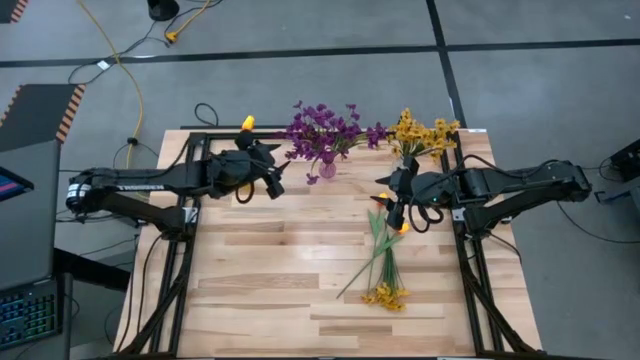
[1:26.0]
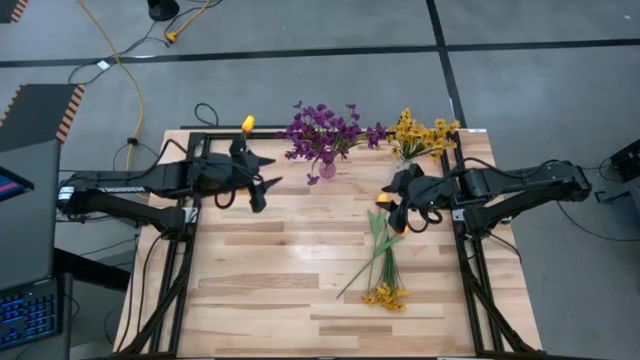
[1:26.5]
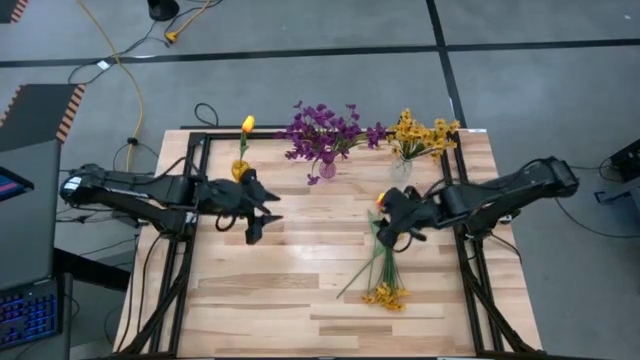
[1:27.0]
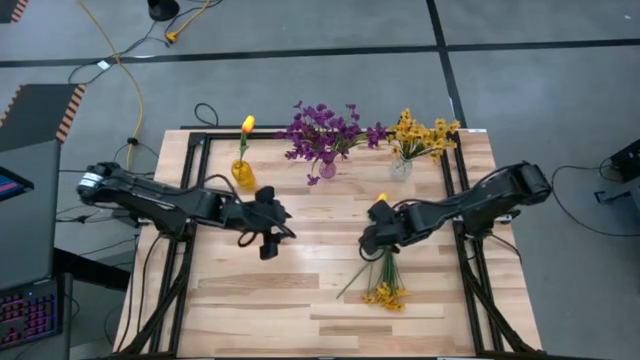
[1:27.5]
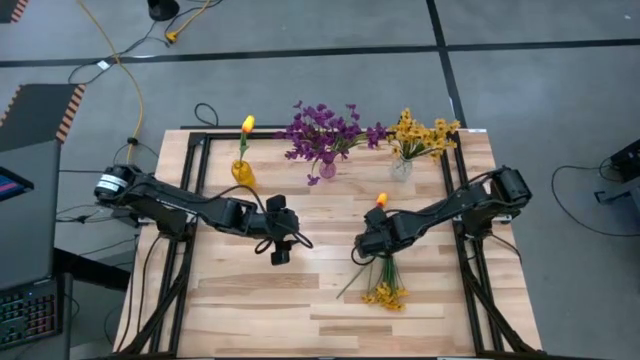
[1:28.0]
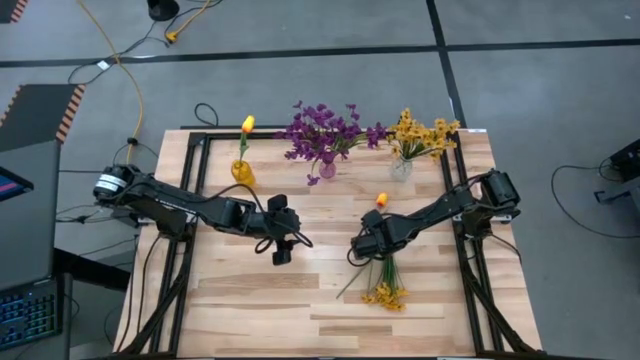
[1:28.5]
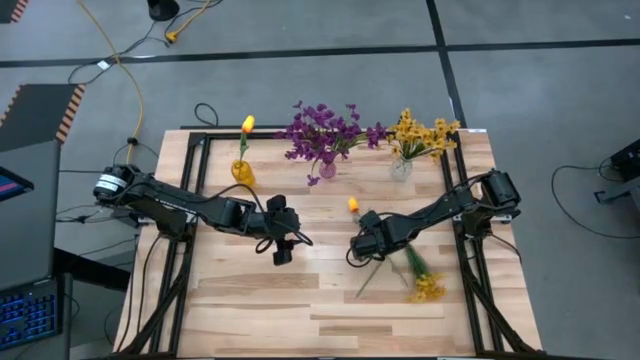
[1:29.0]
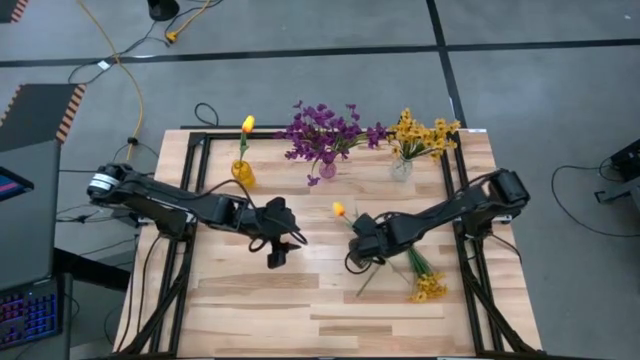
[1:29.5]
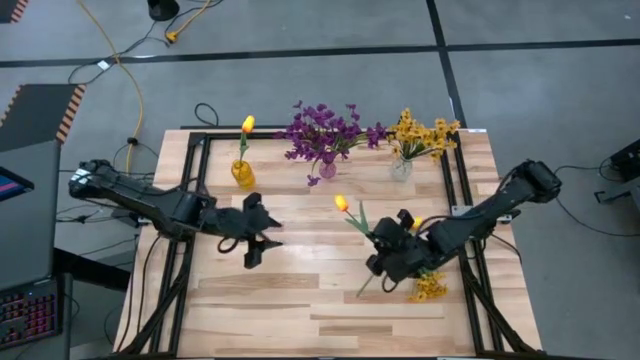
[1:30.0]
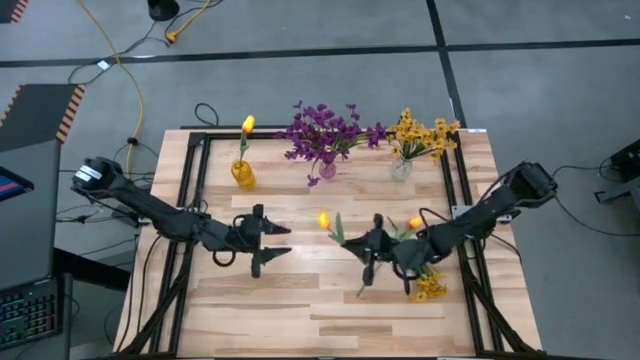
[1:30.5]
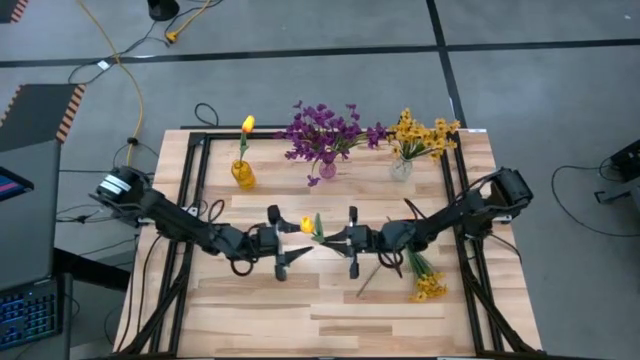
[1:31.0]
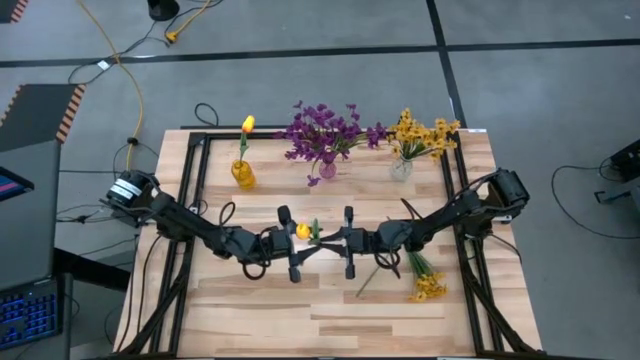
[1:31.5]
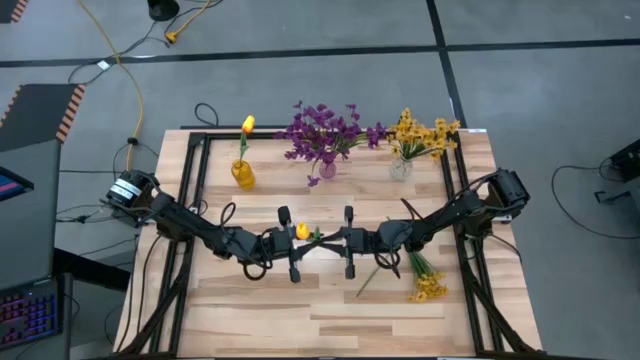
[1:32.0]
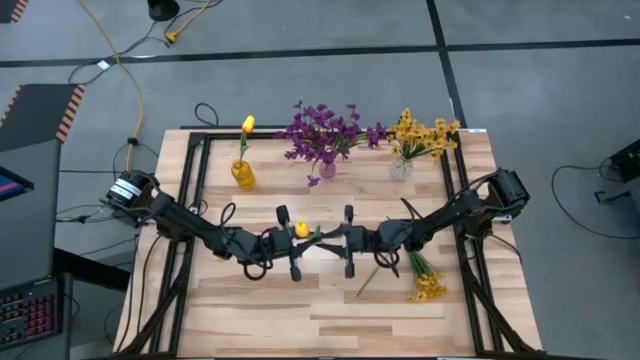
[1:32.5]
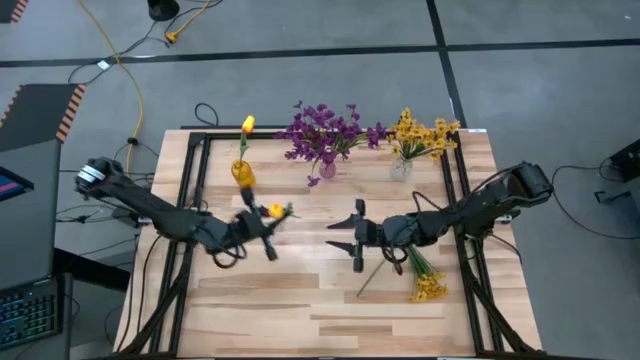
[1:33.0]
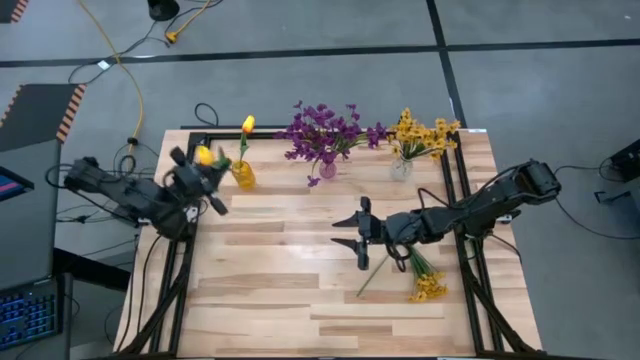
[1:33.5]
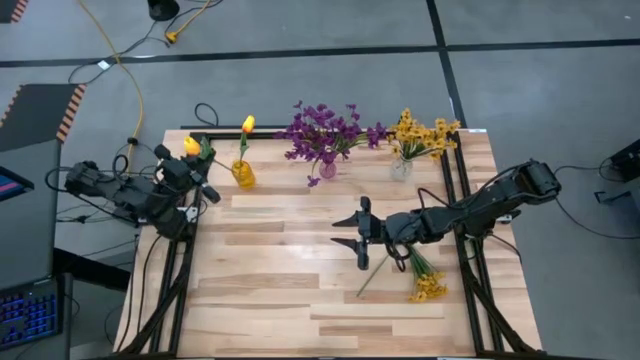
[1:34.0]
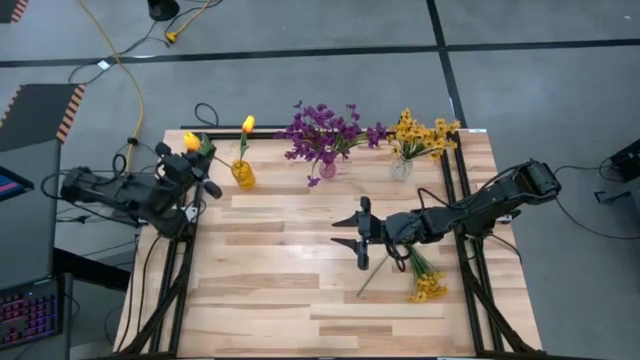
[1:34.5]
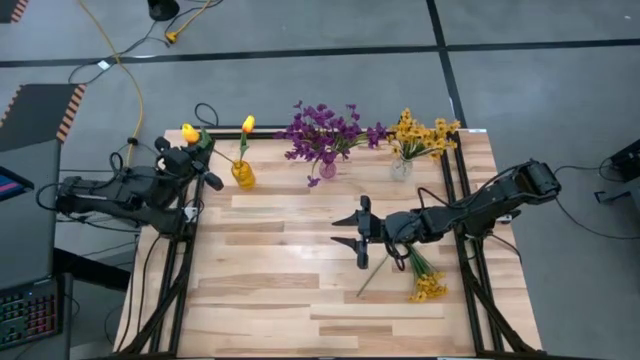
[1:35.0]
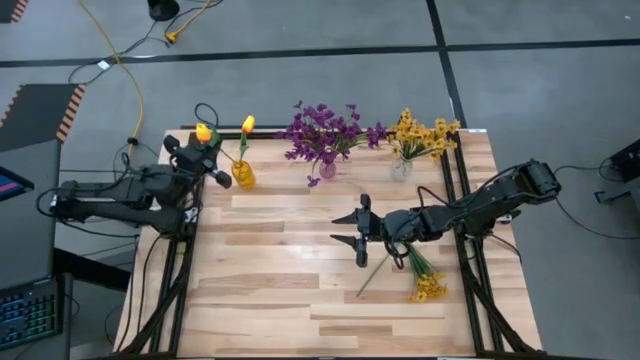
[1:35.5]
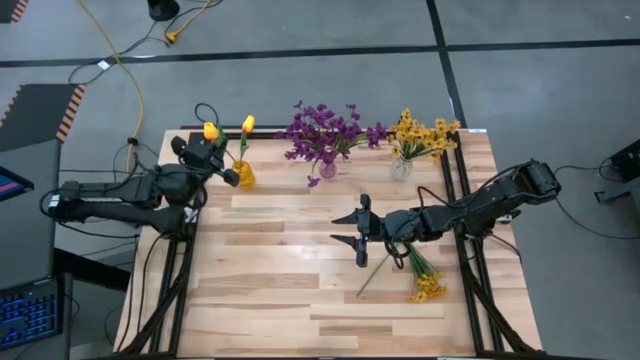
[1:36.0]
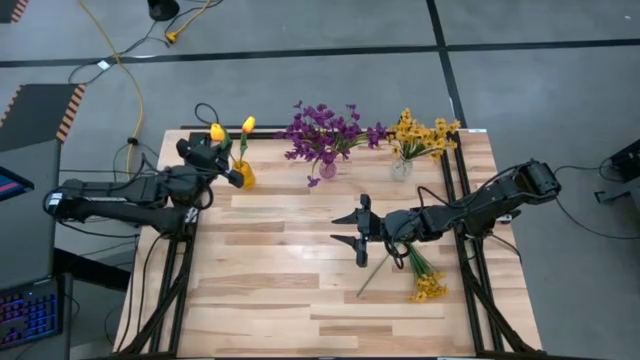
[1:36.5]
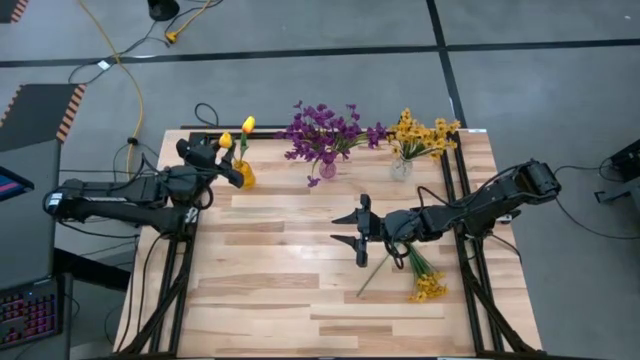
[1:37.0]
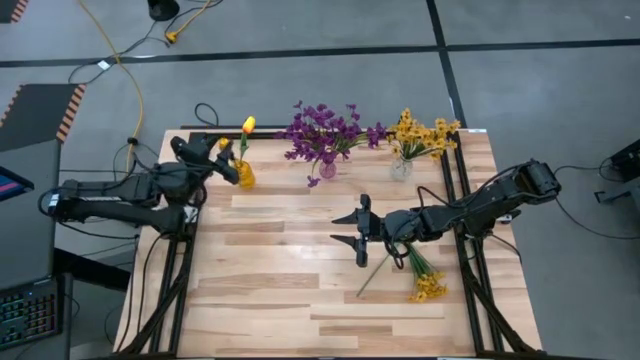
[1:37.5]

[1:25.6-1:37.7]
Task: Sort flowers into vase by color
Put the left yellow tulip into the yellow vase

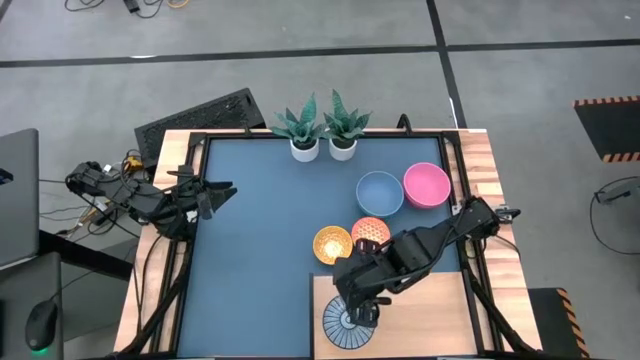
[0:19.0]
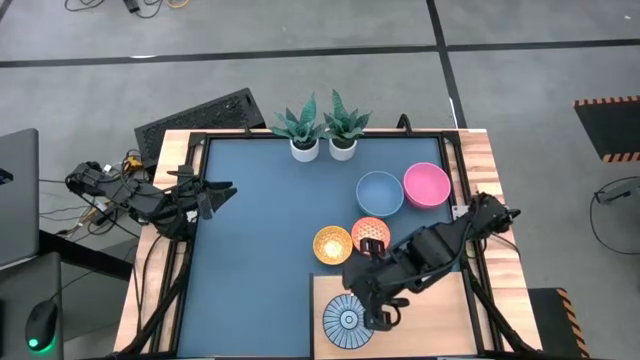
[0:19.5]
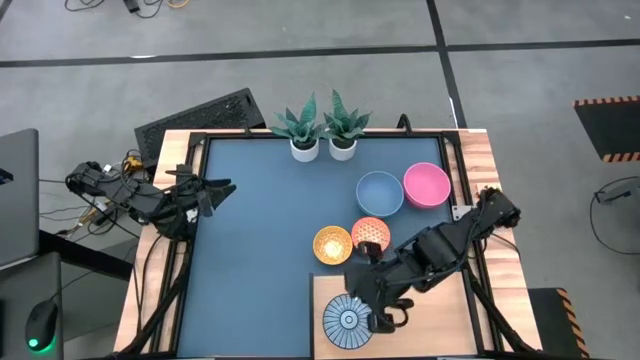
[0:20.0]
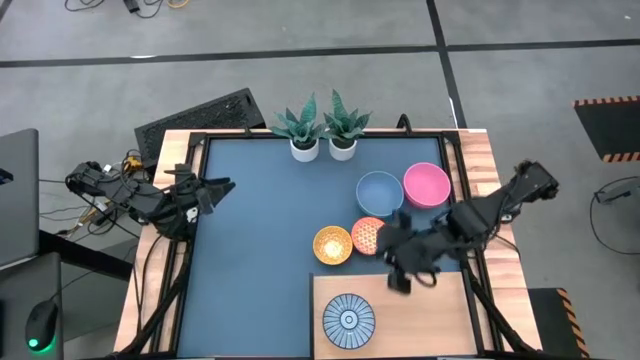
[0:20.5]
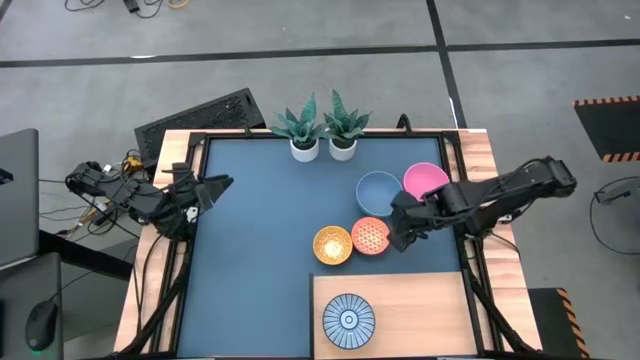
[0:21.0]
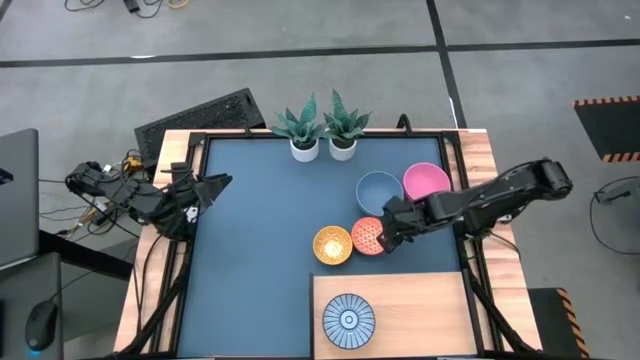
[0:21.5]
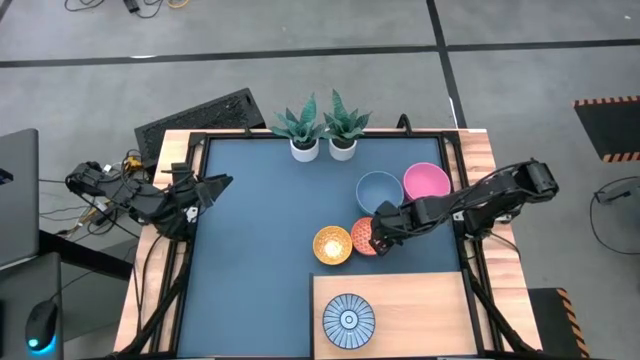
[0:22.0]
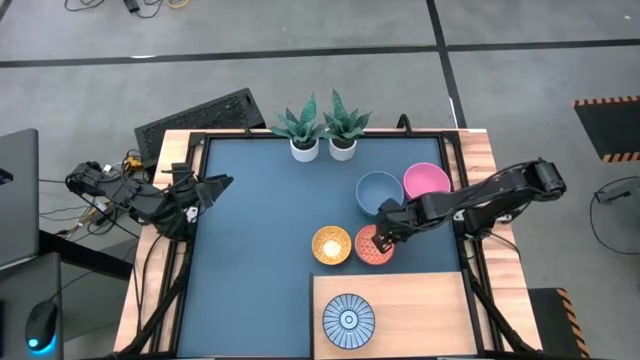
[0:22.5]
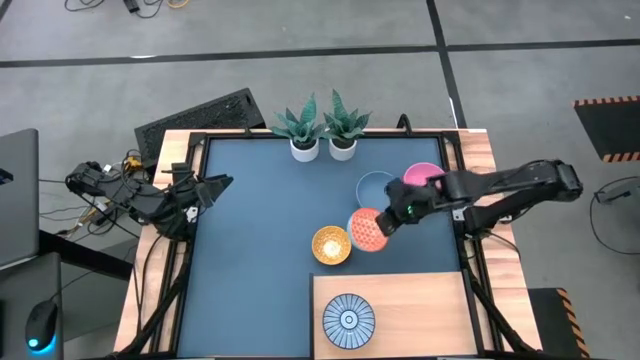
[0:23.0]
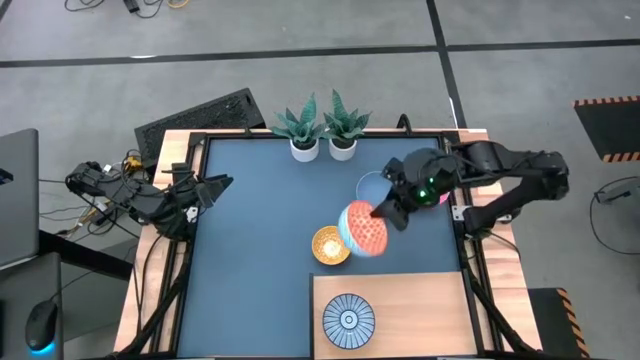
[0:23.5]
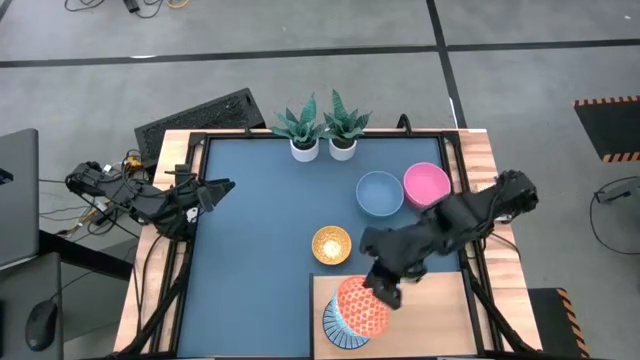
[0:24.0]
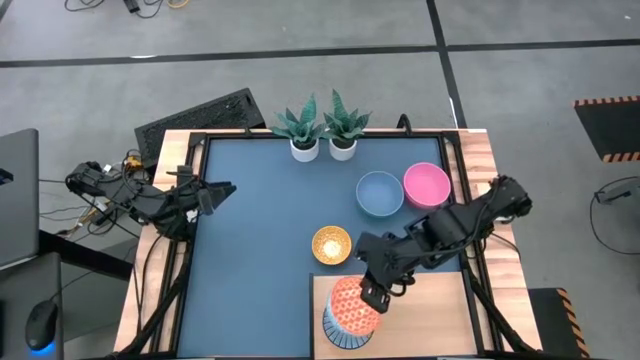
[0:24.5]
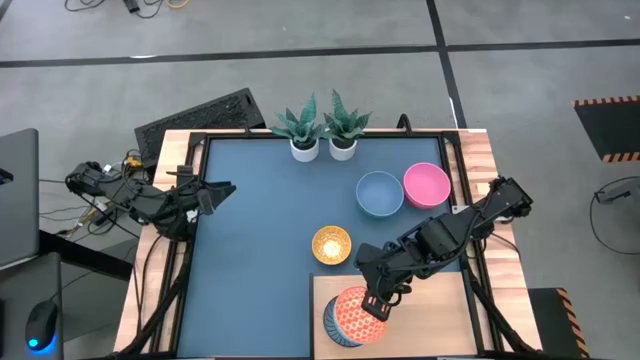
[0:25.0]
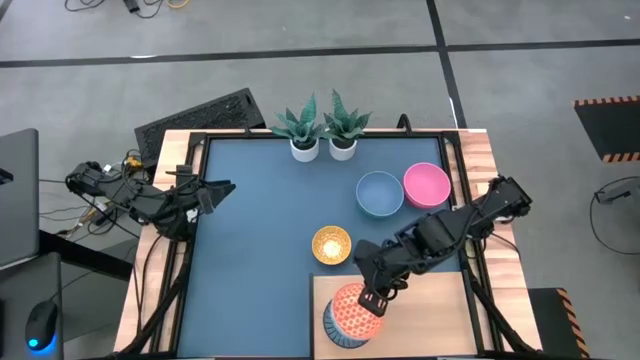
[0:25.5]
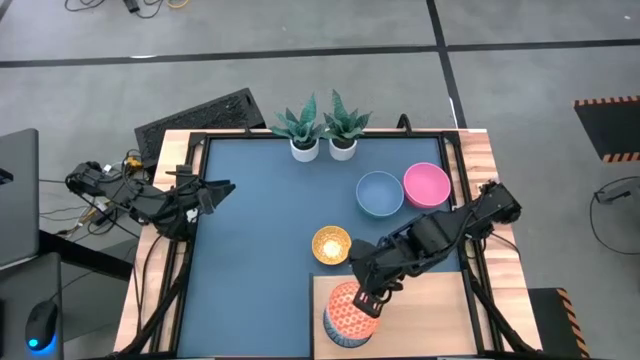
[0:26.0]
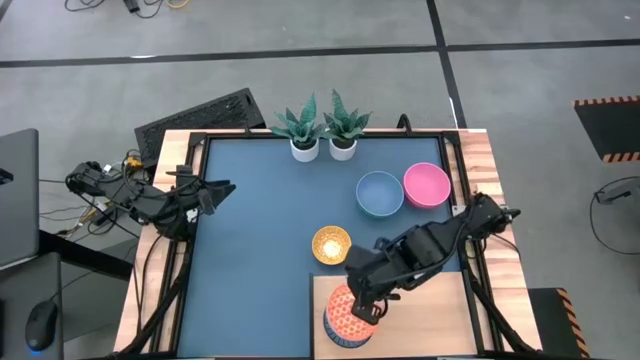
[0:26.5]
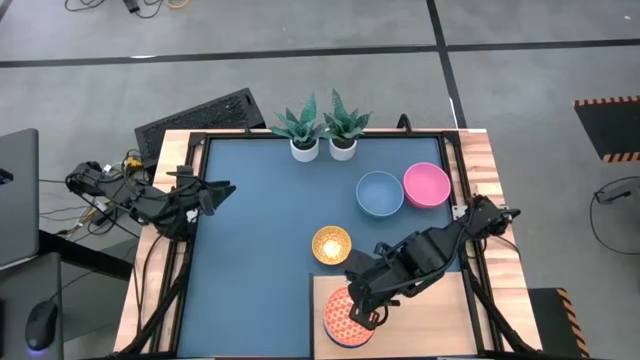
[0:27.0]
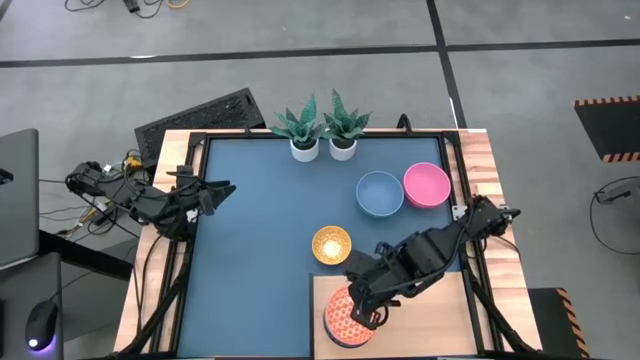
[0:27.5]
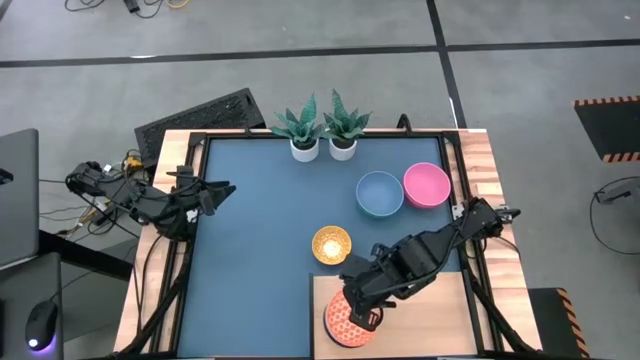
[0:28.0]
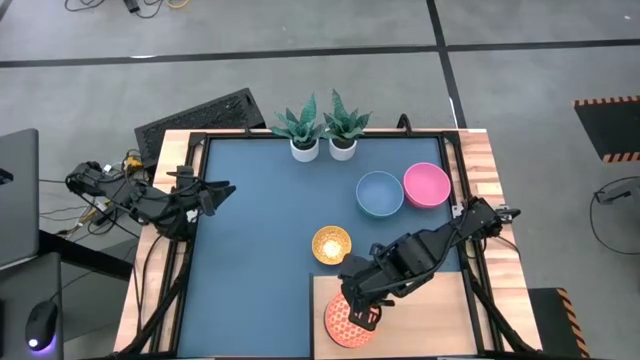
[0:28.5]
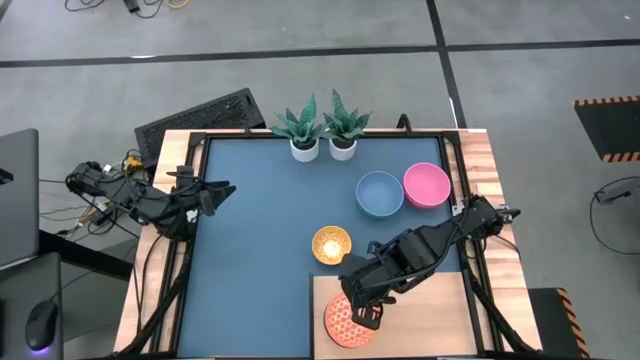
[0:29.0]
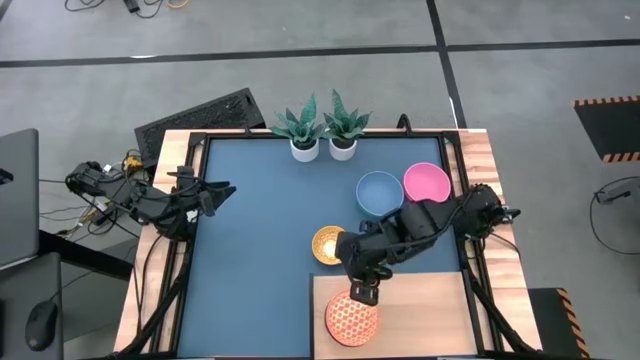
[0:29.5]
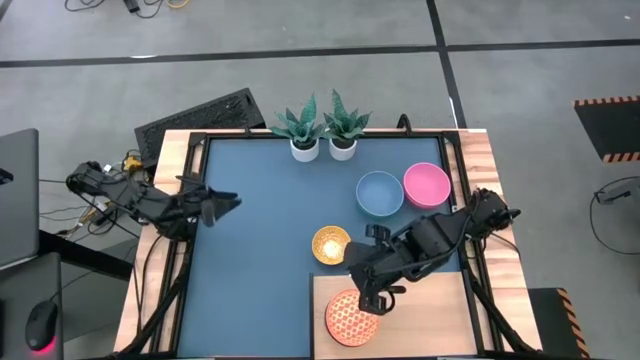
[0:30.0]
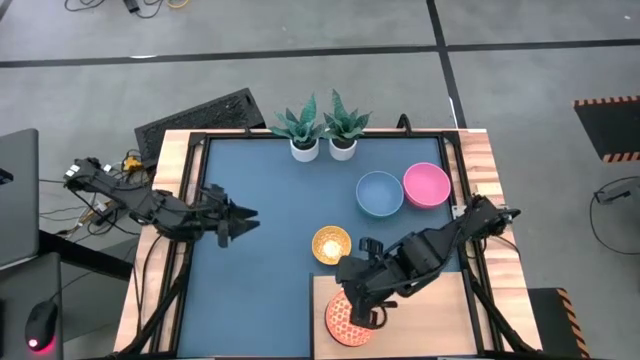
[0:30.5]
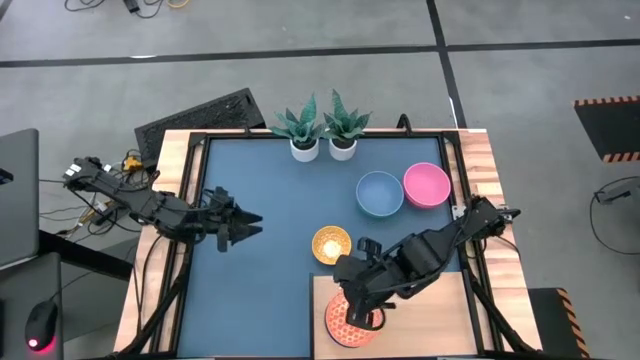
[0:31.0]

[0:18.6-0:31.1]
Task: Place and stack bowls onto a shelf
Stack the orange patterned bowl on top of the blue patterned bowl on the shelf
